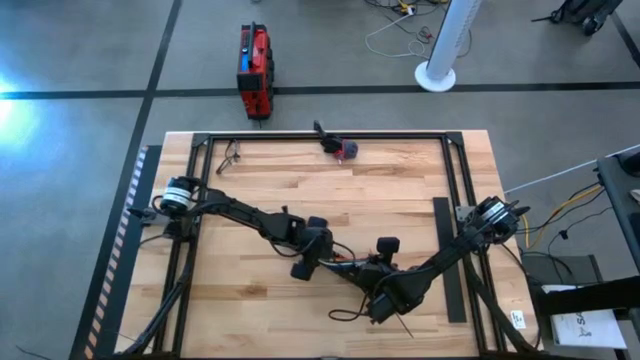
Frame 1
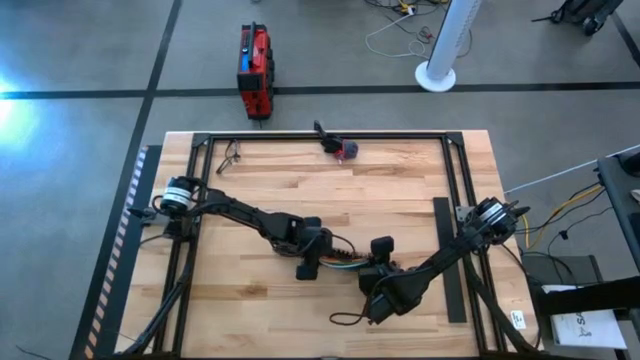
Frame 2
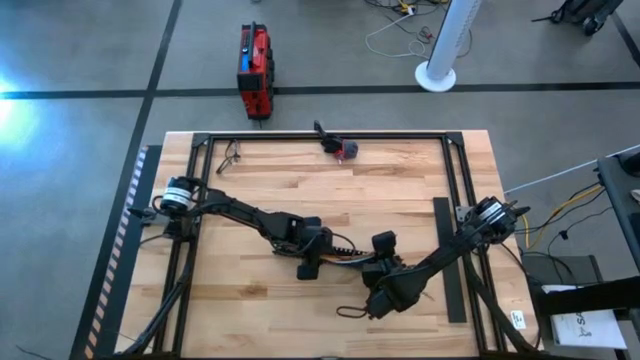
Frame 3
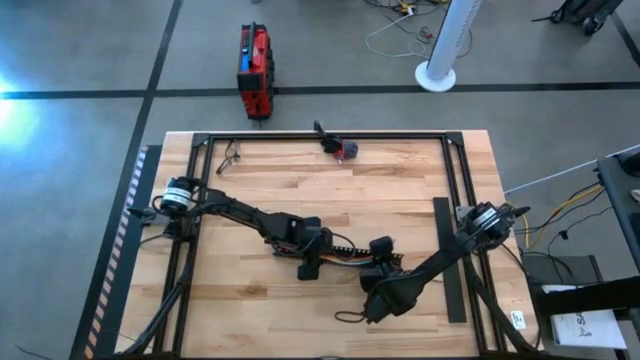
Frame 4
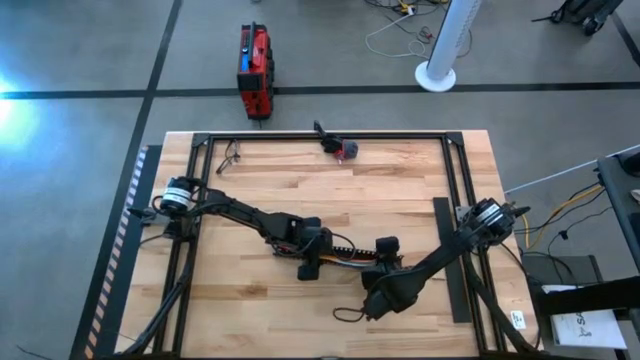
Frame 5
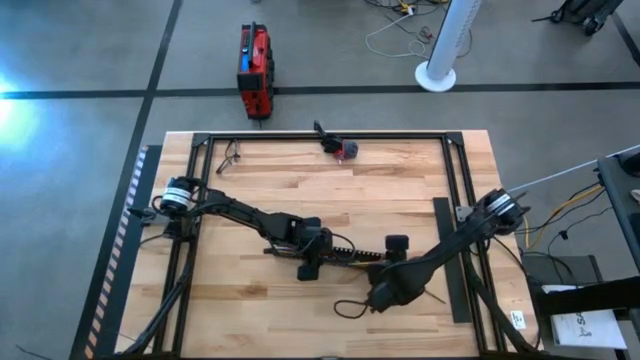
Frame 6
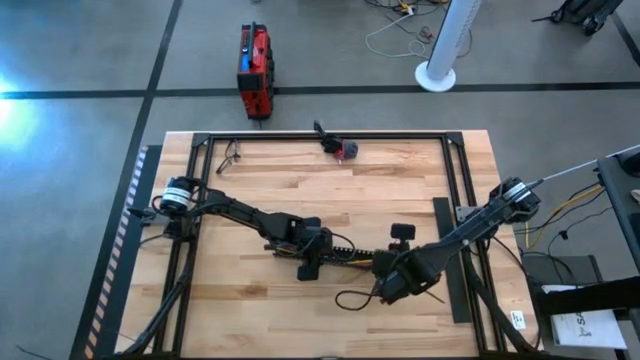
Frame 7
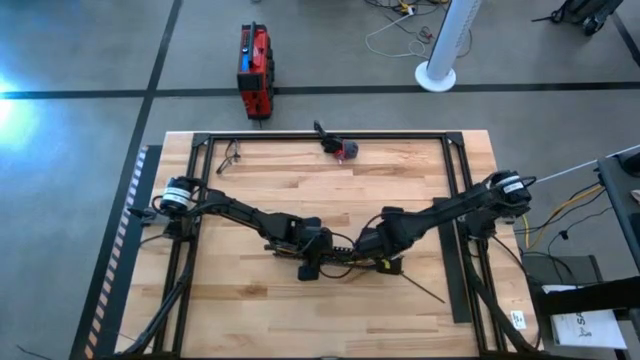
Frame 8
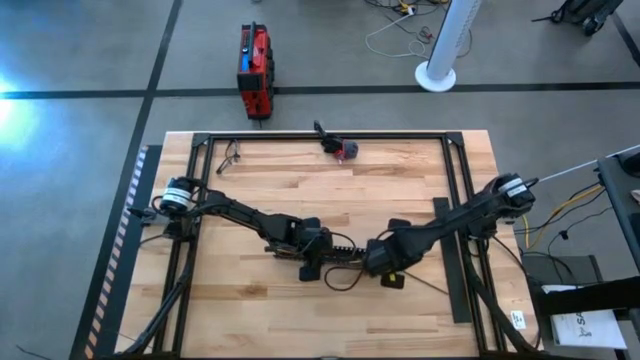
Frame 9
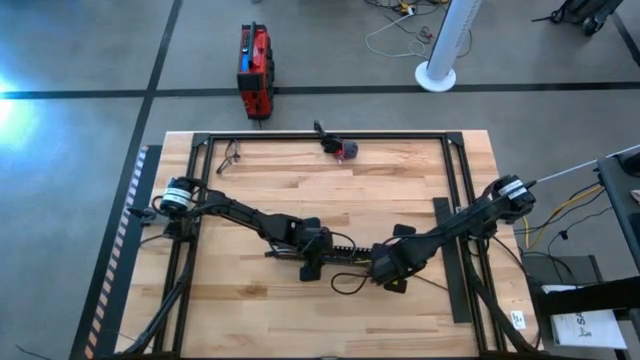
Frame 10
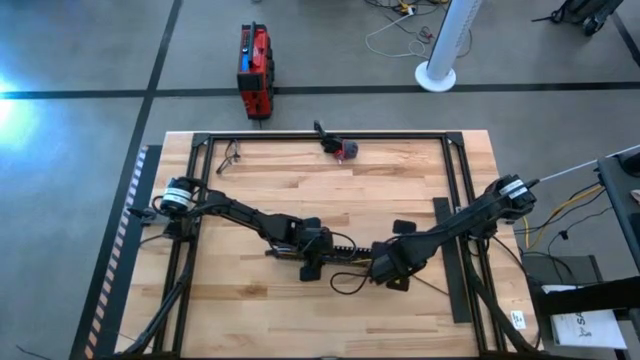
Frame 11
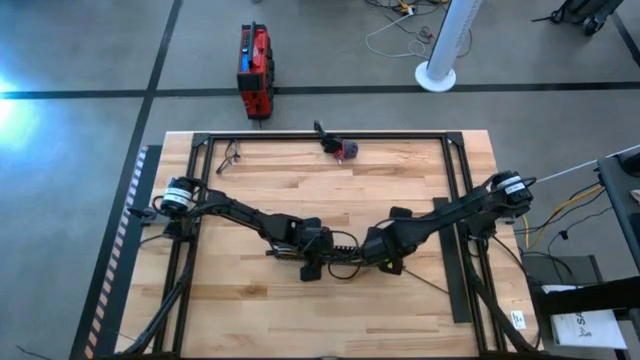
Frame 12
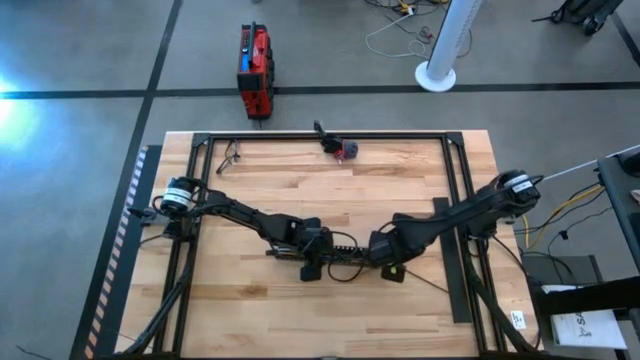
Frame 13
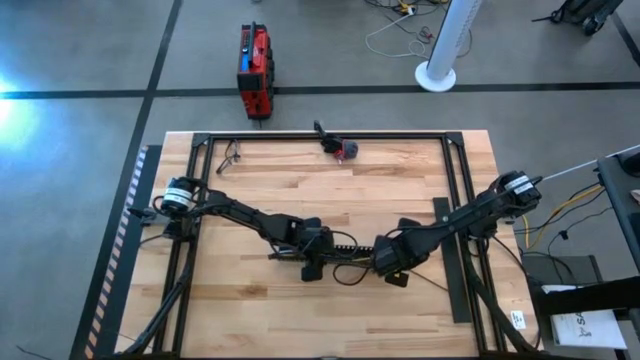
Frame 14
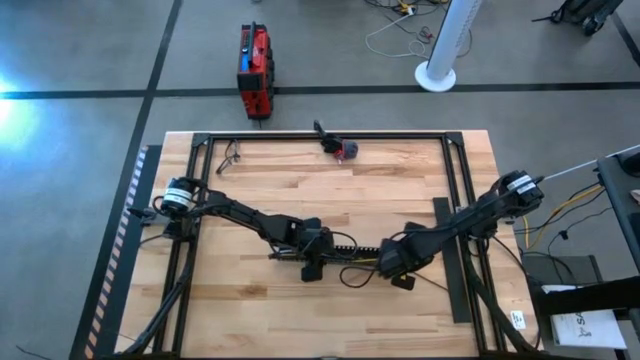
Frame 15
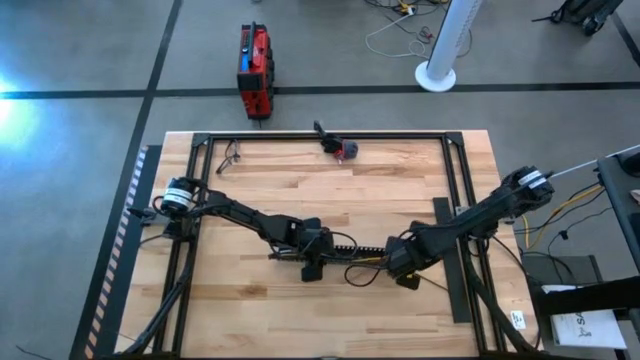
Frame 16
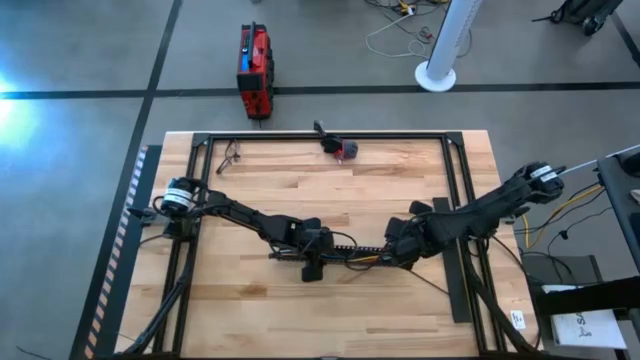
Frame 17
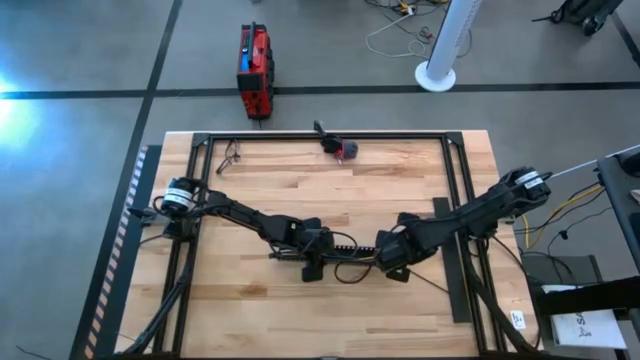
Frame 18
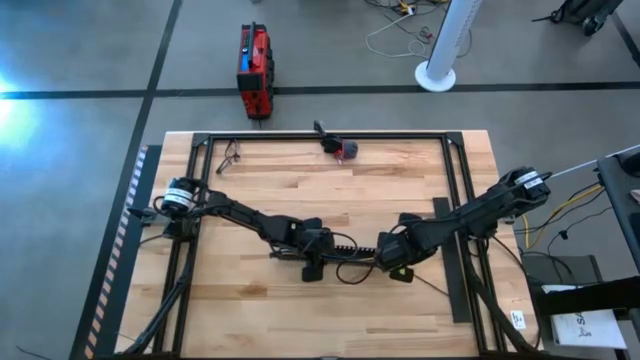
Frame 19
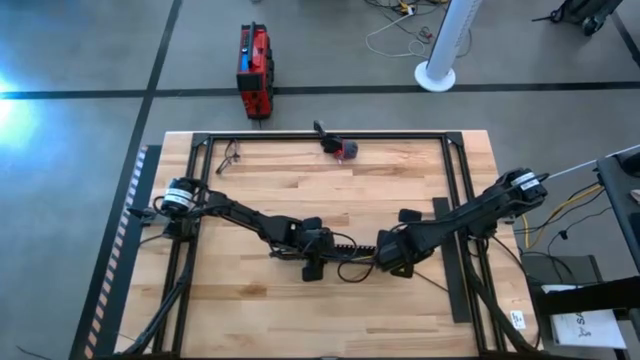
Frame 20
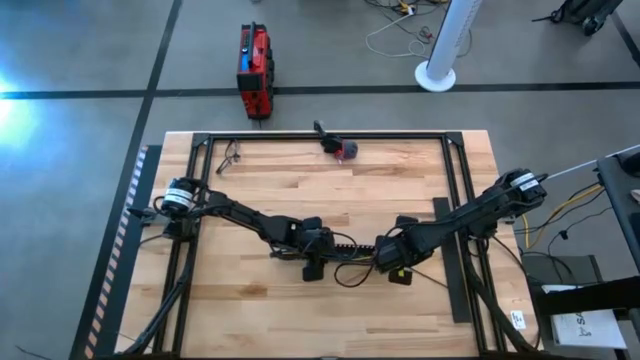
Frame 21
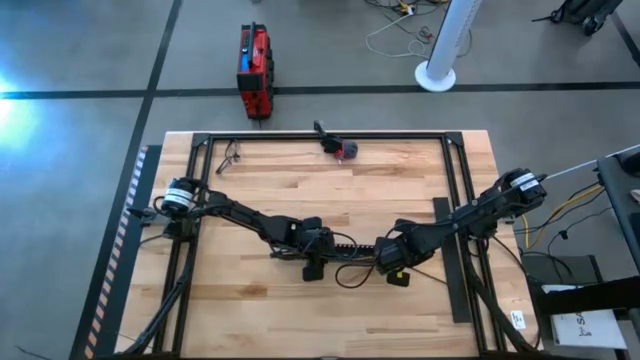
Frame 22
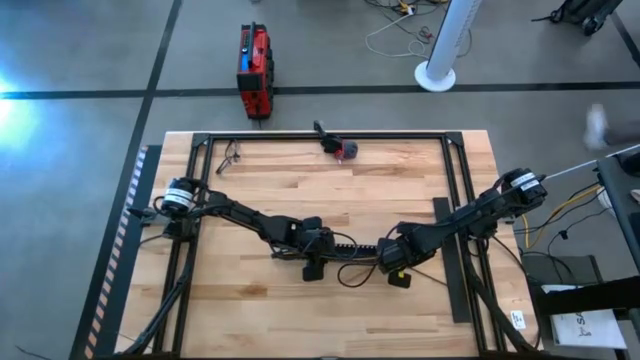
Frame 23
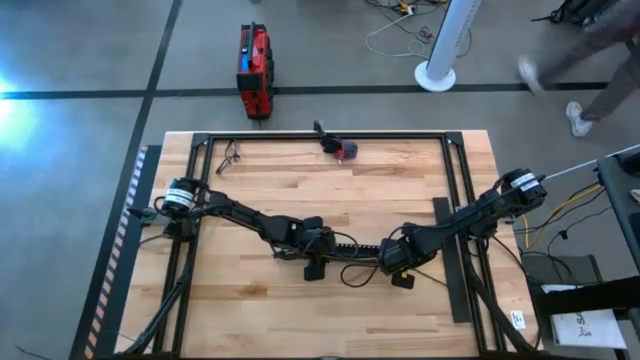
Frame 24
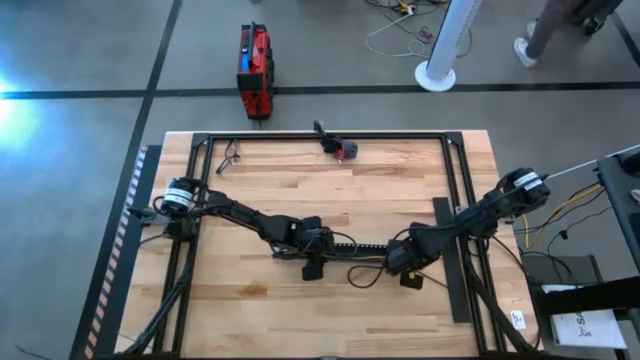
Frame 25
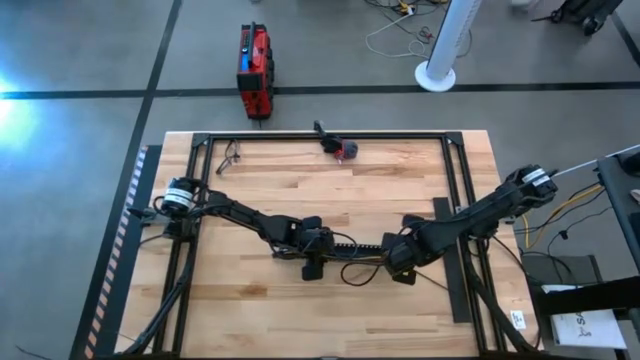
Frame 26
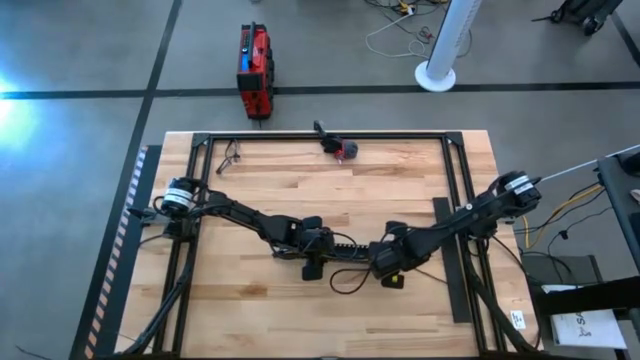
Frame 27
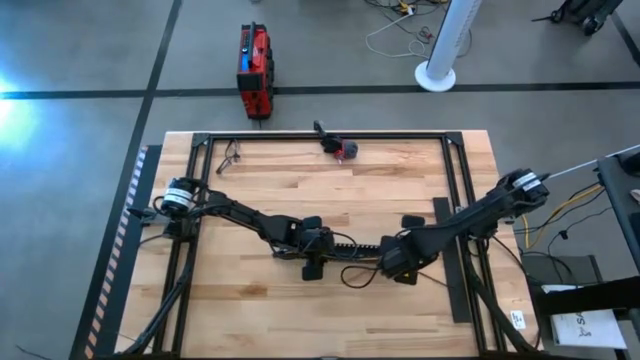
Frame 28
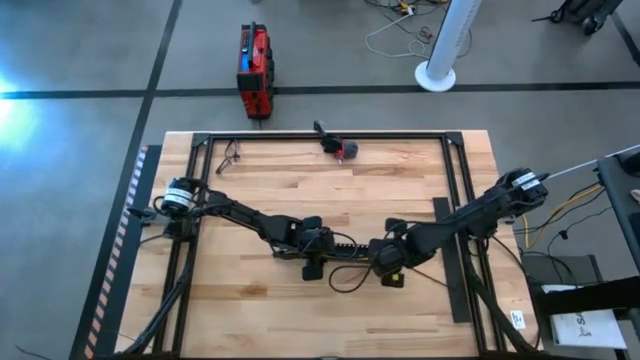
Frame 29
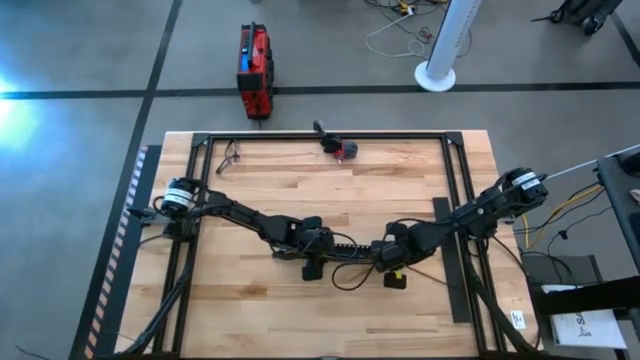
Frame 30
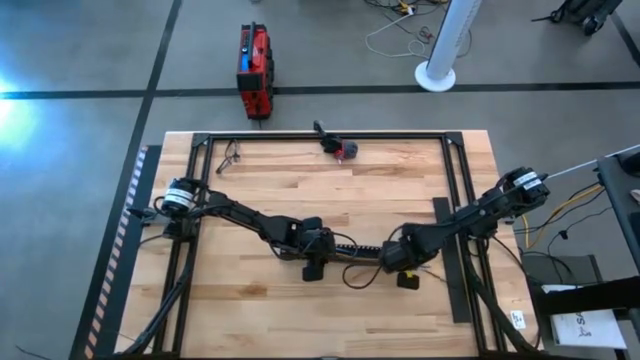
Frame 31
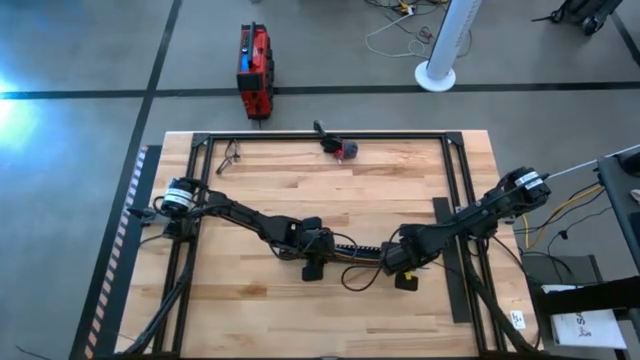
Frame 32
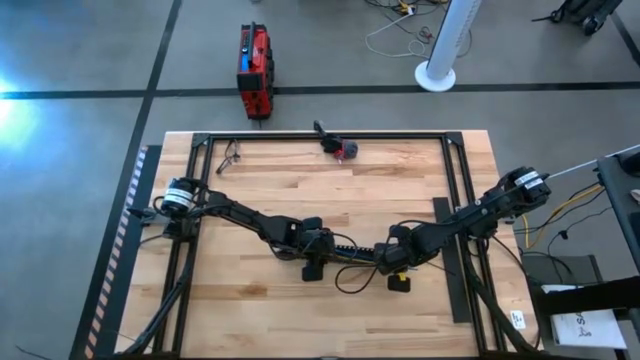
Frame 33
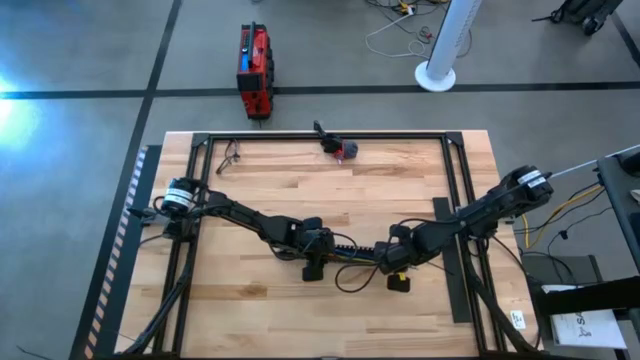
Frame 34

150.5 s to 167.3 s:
Task: Ziptie cables
Put the wires into the black cable duct

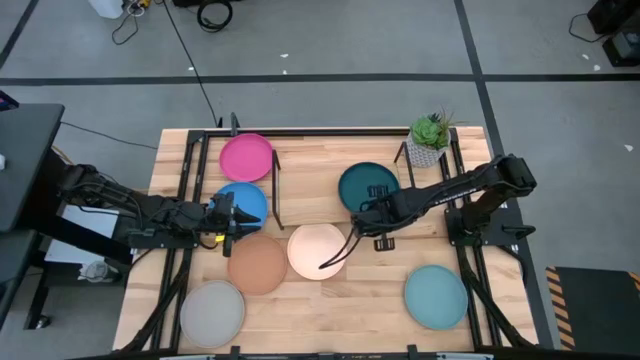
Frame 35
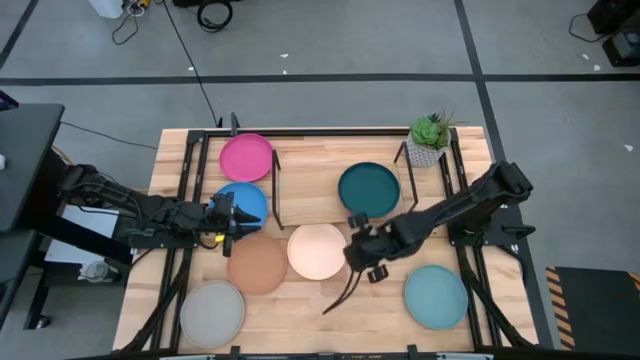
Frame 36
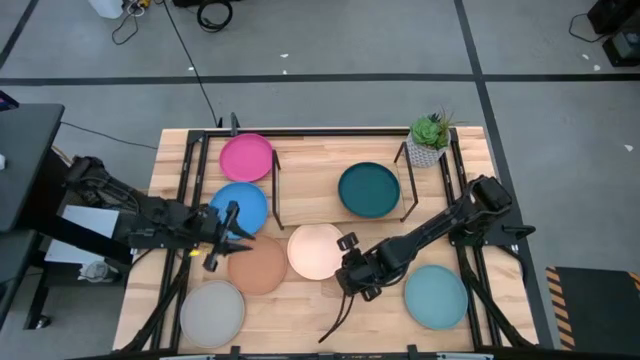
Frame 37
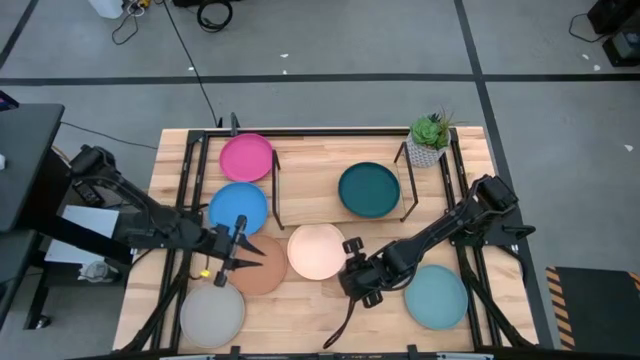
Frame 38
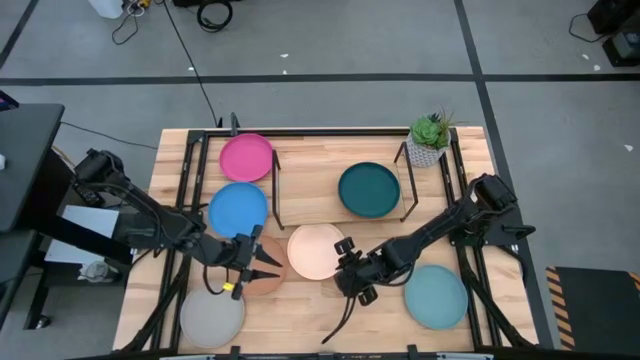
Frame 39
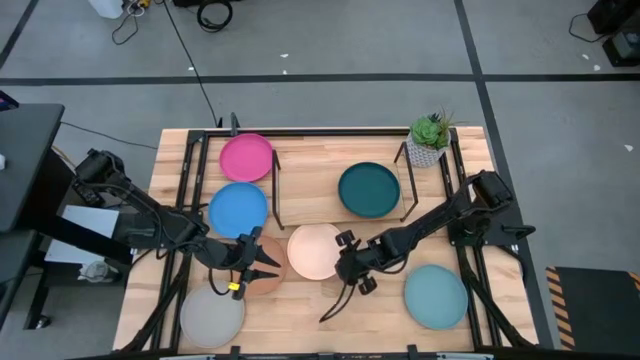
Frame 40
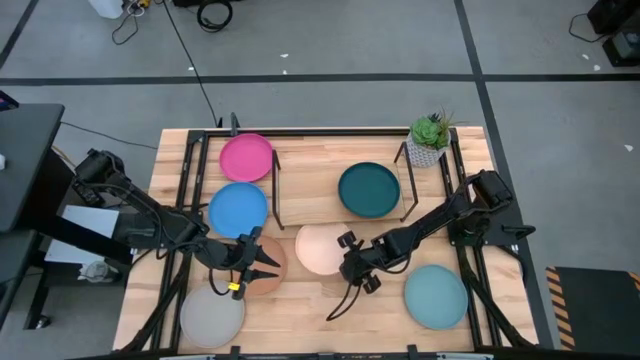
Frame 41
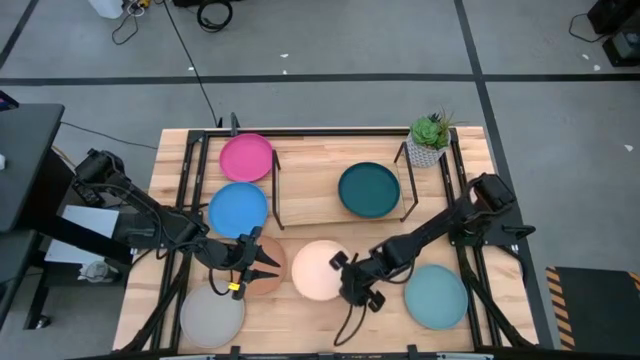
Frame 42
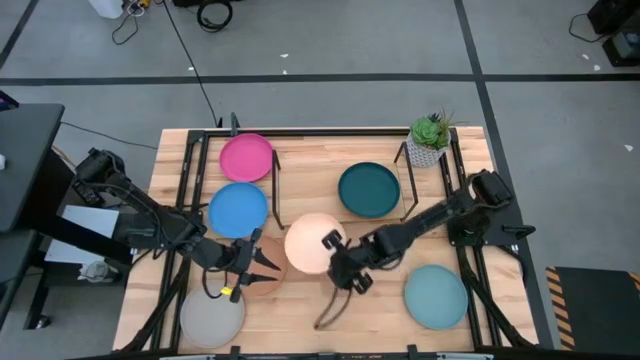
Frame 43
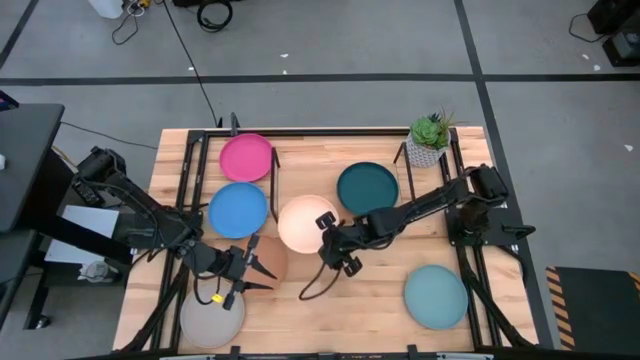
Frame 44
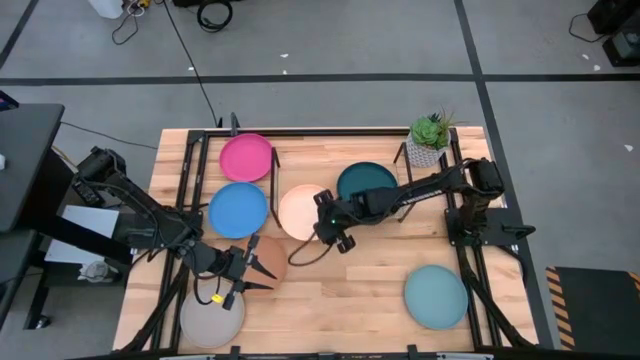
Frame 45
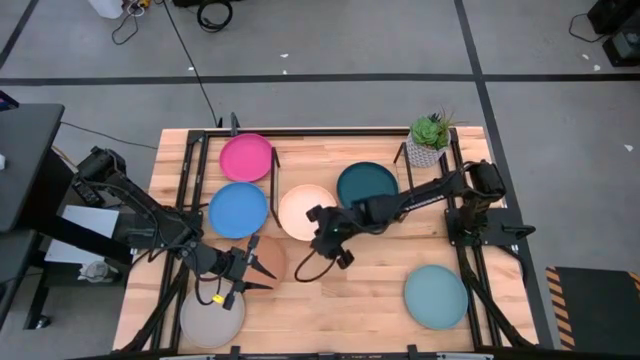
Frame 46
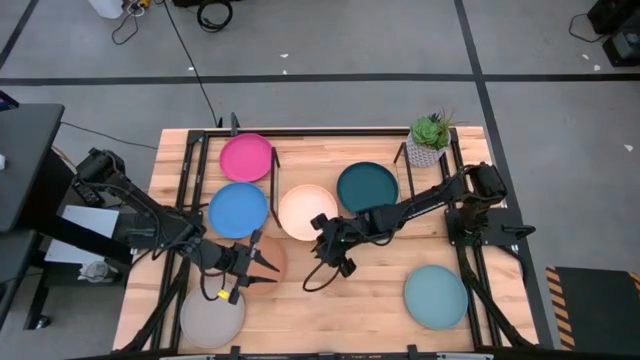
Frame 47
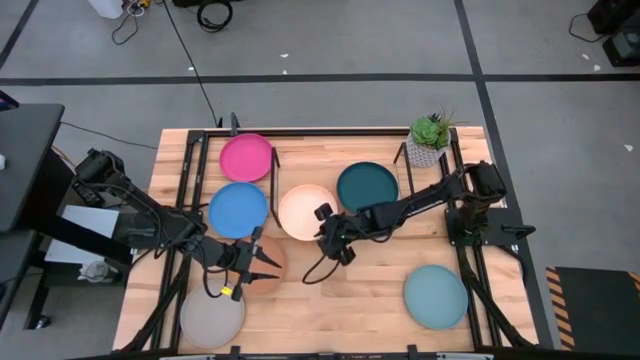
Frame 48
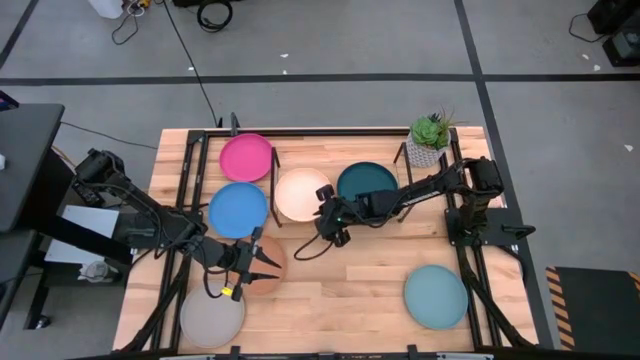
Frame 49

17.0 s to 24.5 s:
Task: Place and stack plates onto a shelf
Put the light orange plate on the shelf
